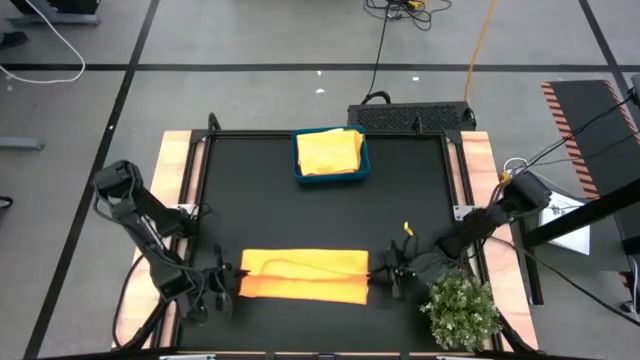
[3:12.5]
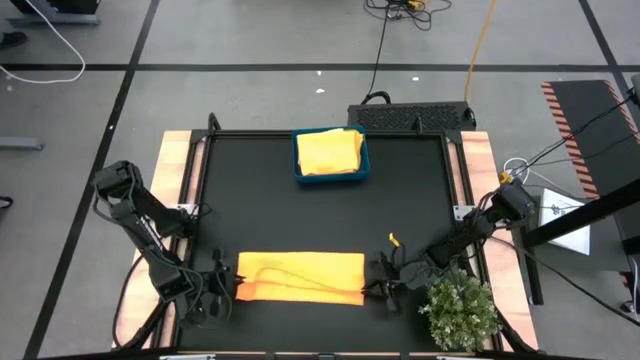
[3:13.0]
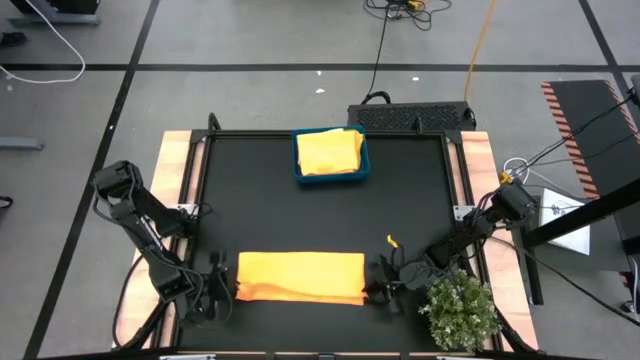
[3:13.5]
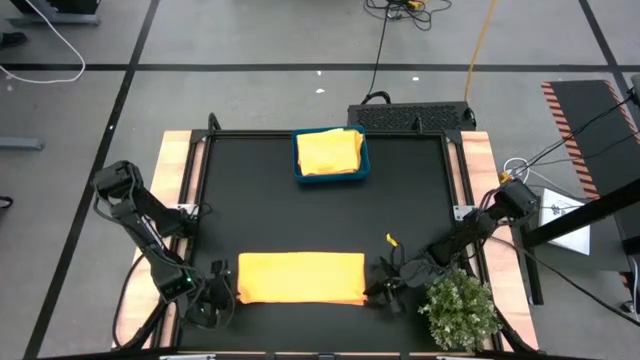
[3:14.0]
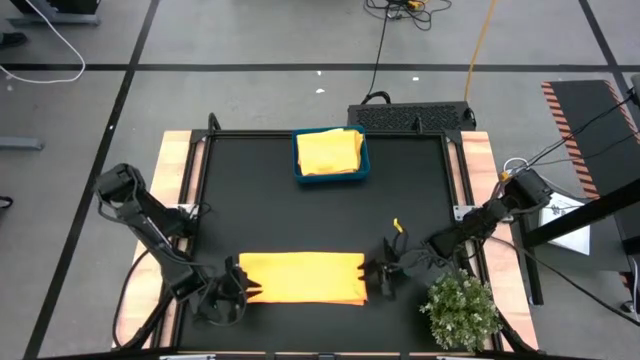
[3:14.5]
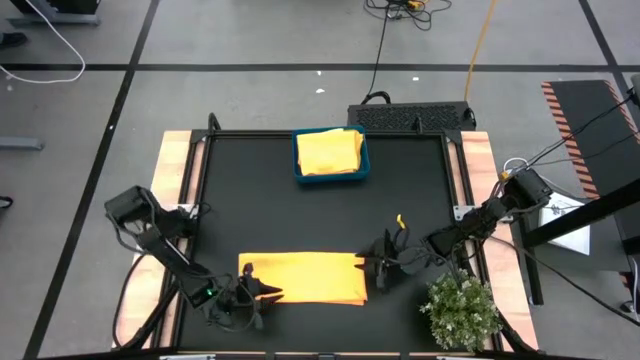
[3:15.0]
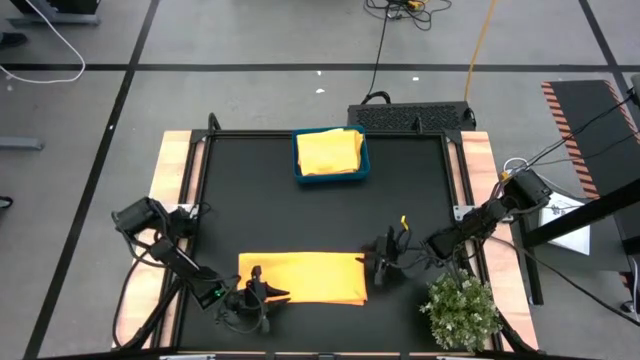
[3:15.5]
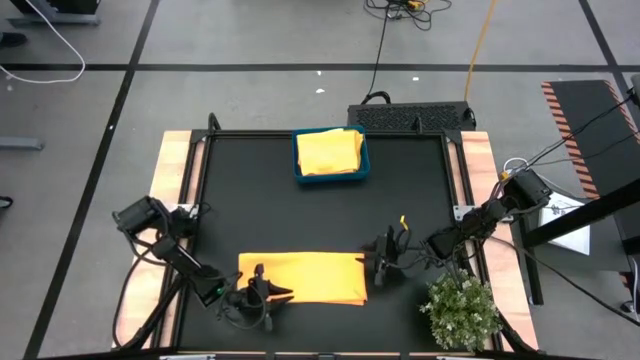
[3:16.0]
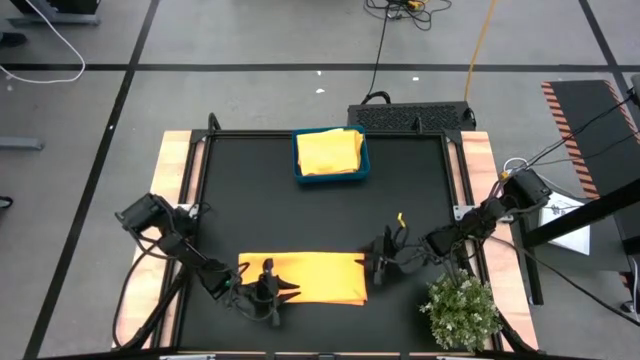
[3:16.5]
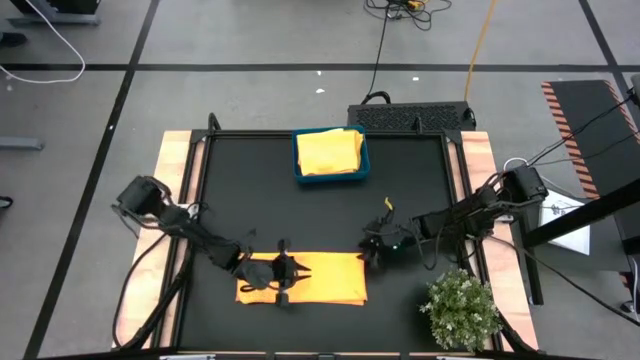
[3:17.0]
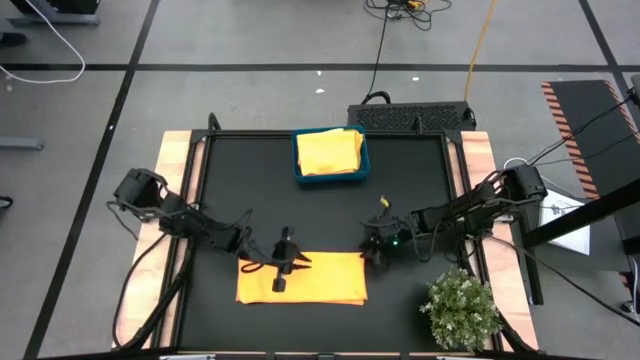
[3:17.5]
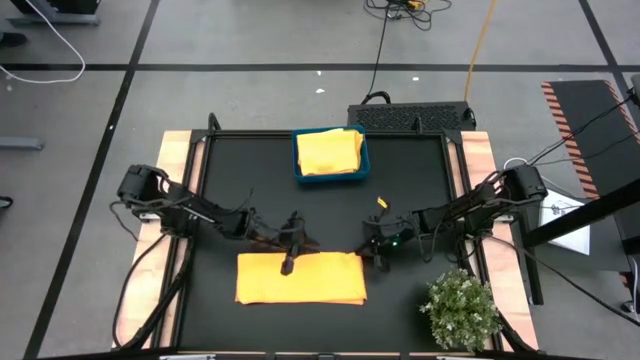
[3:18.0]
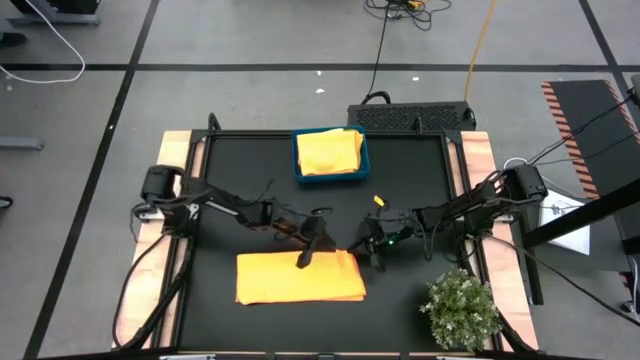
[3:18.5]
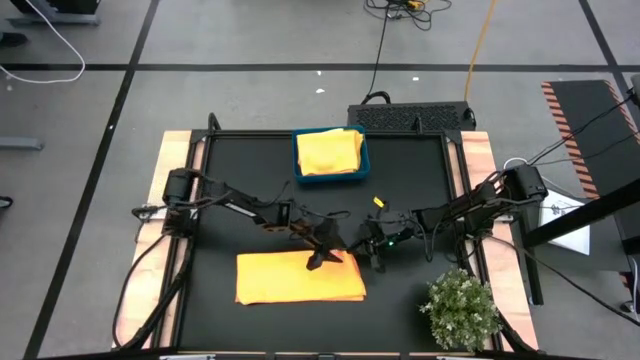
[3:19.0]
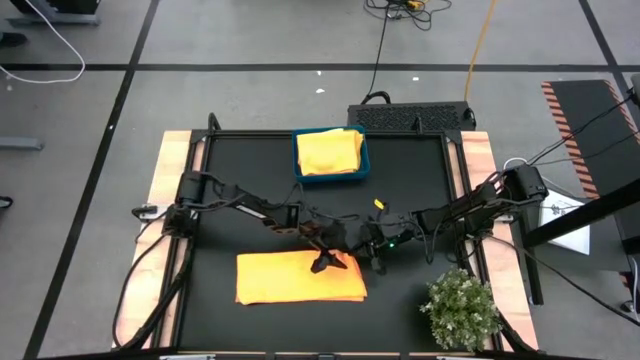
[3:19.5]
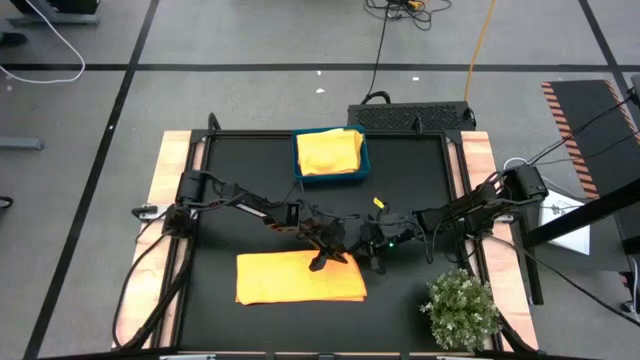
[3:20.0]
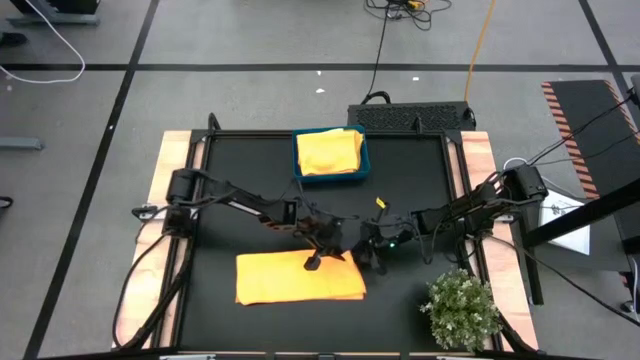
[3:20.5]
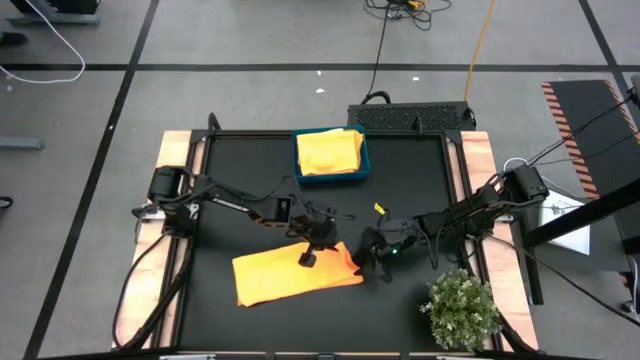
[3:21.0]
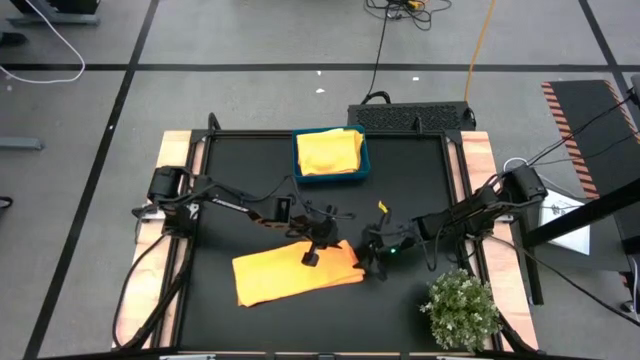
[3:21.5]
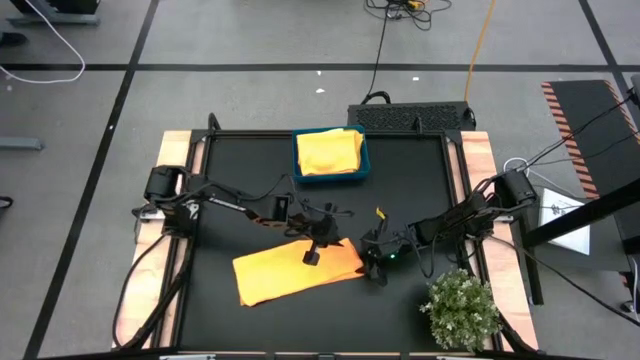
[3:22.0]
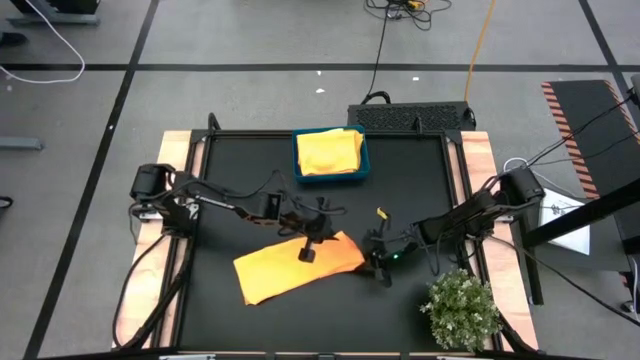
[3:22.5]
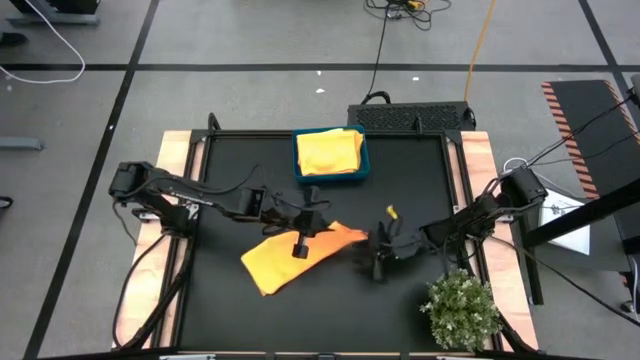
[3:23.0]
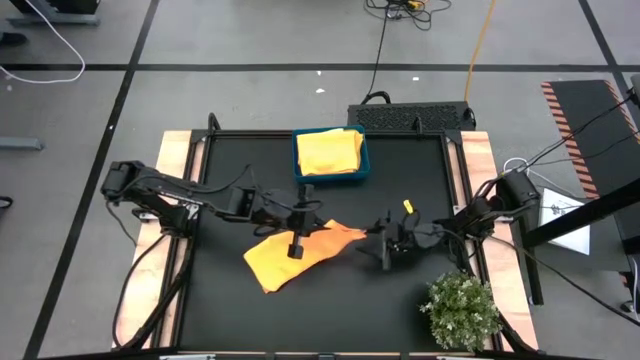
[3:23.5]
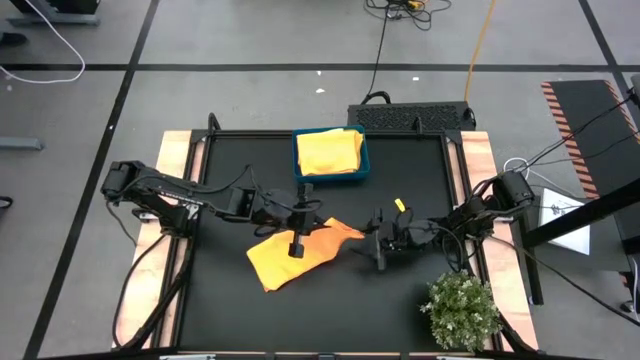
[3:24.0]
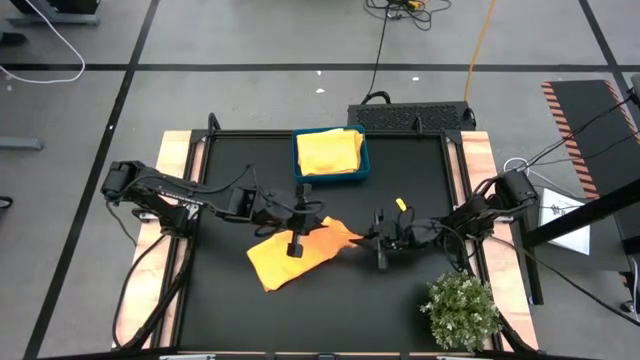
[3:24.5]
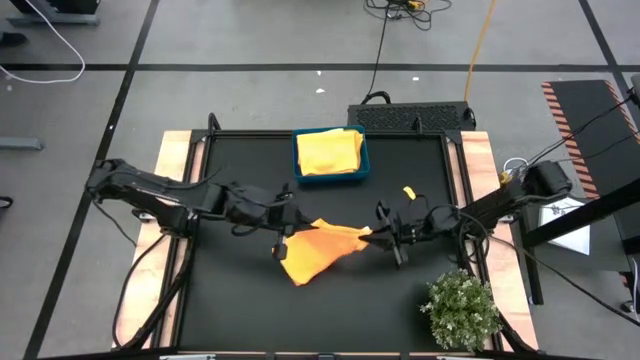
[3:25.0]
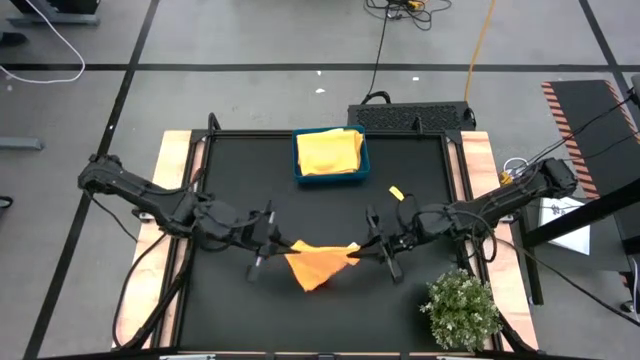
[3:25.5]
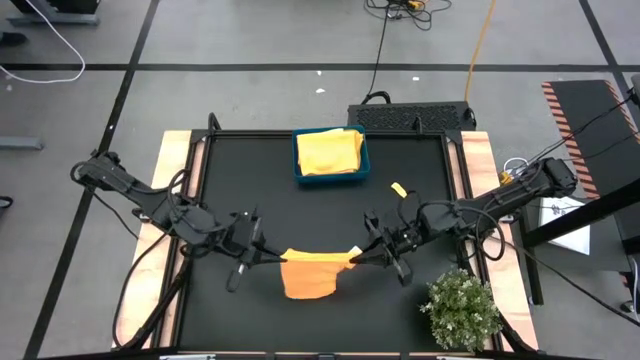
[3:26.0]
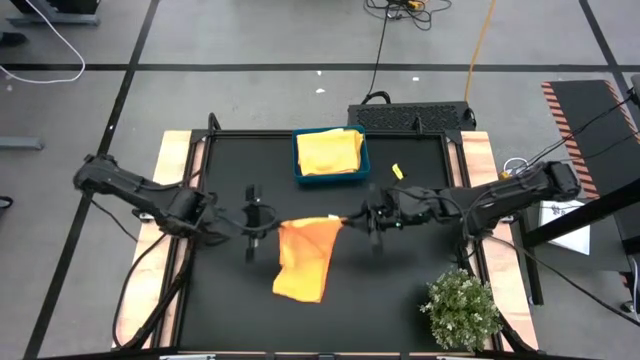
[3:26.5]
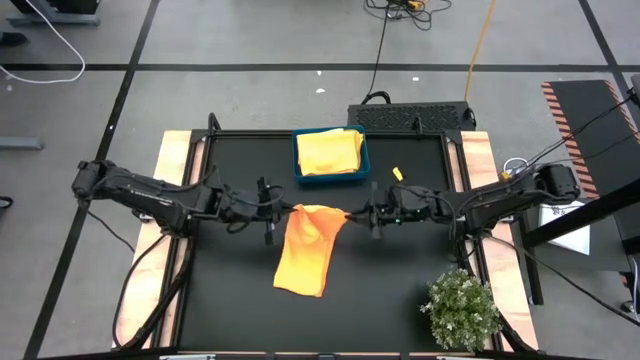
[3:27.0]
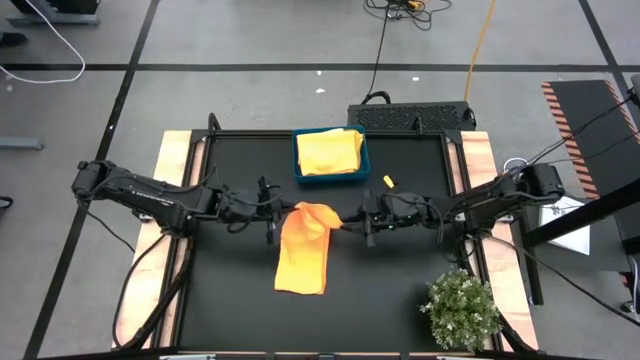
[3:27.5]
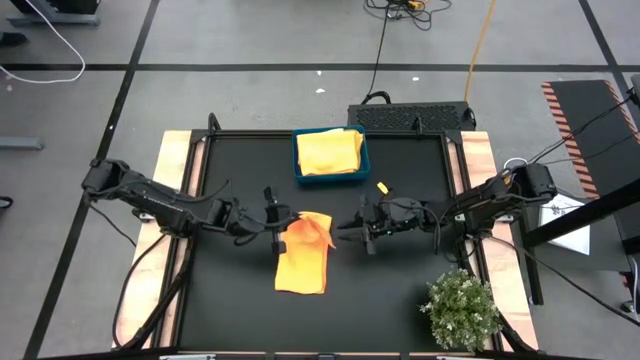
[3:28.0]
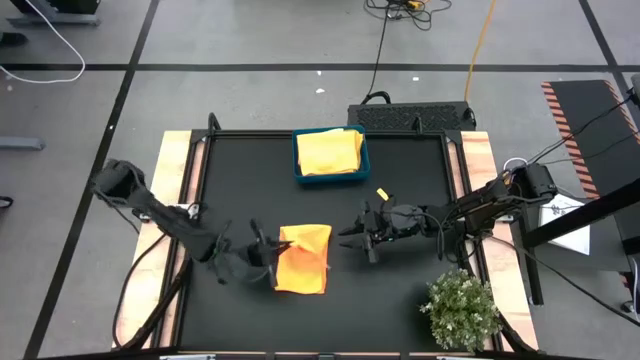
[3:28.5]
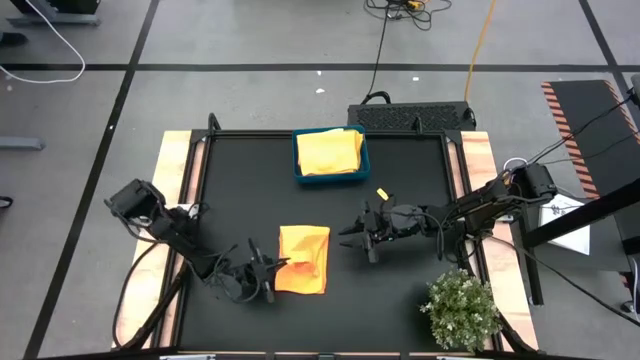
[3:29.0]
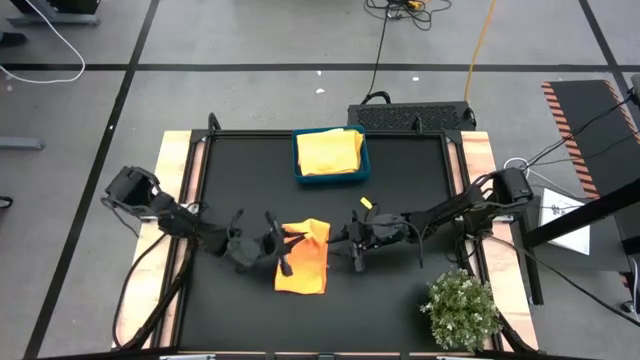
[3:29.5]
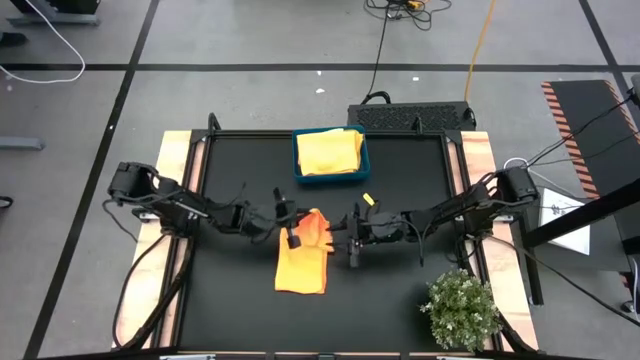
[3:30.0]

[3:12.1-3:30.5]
Task: Fold microfiber towels
Fold the orange microfiber towel

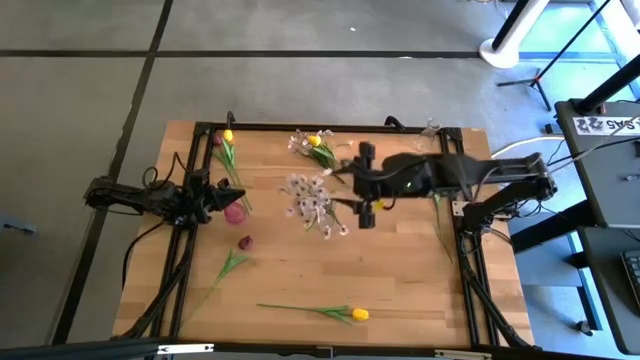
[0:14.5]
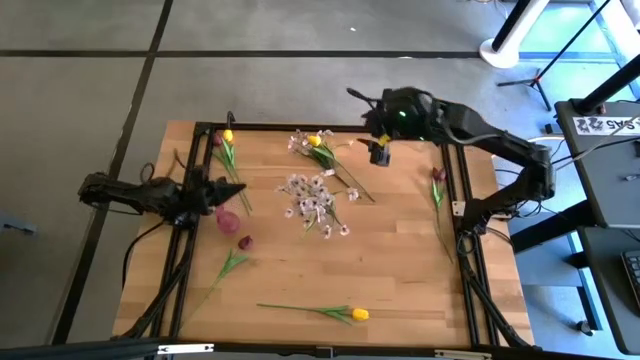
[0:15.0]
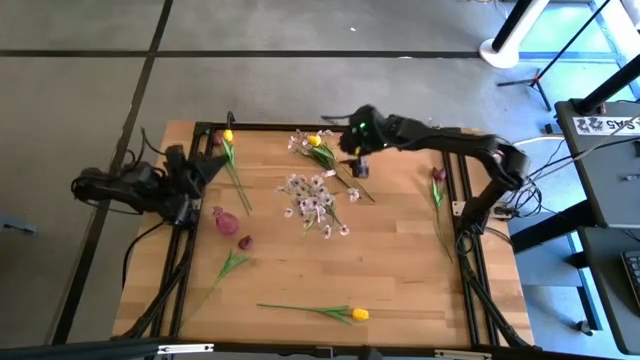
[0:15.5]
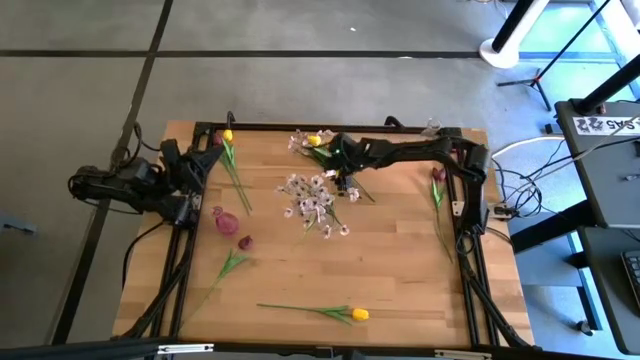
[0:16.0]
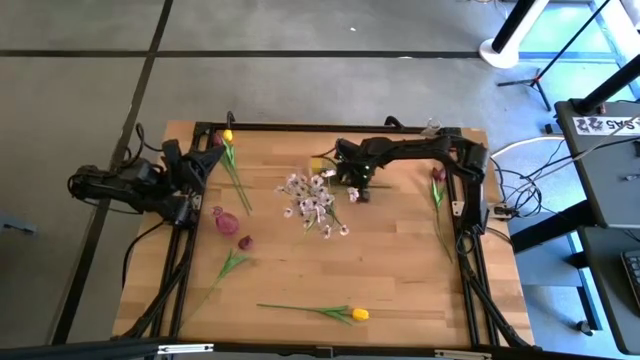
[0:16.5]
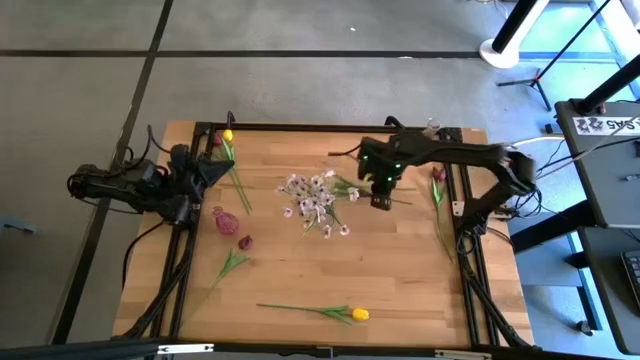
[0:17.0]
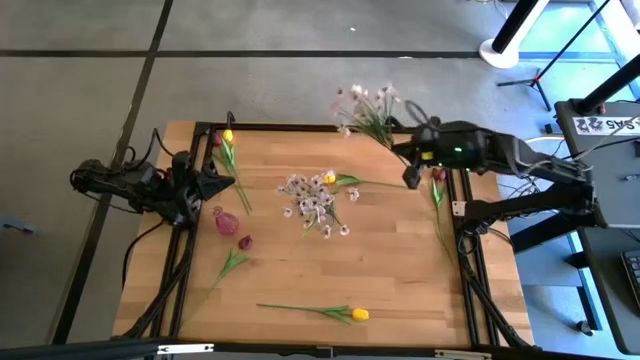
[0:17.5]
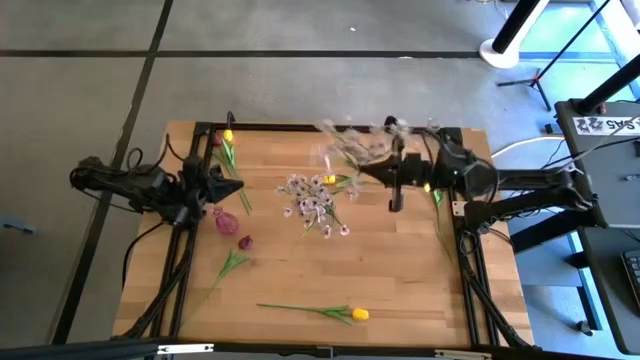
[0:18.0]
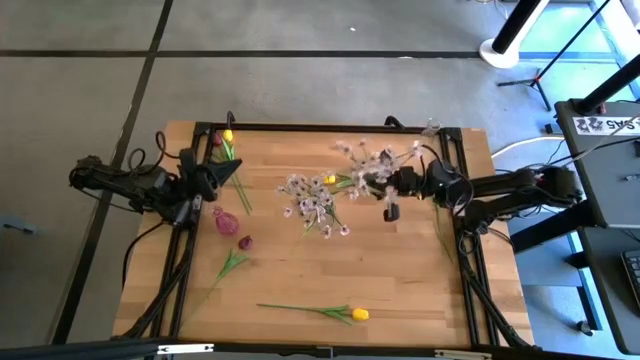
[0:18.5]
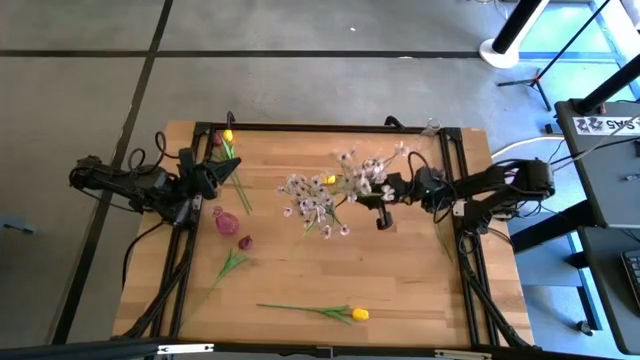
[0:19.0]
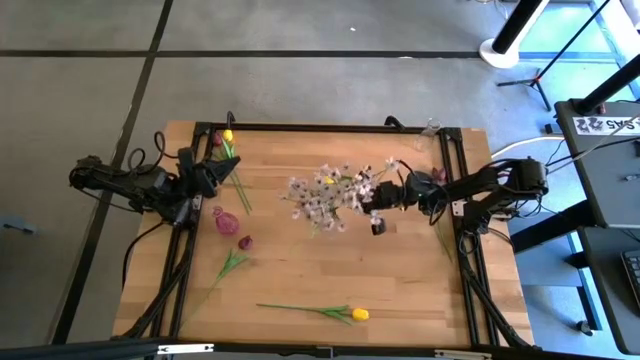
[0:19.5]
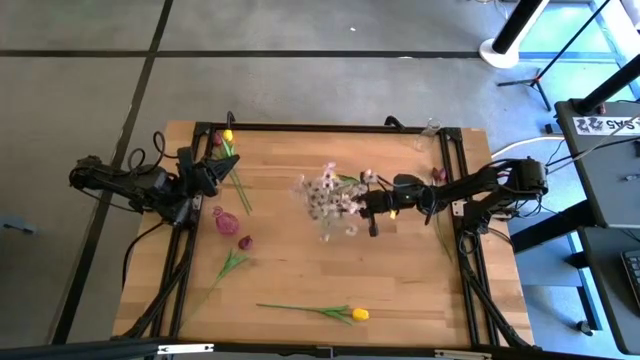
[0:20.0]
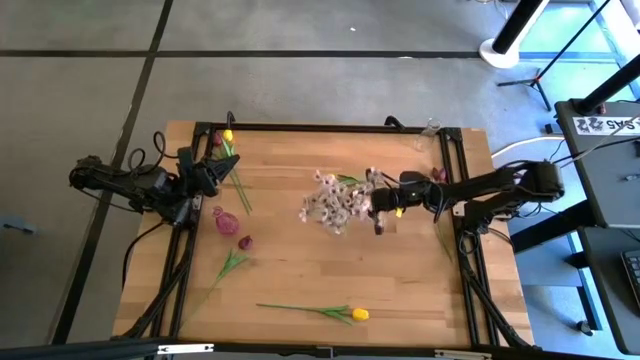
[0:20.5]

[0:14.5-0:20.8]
Task: Sort flowers into vase by color
Put the white flowers into the bottom transparent vase
